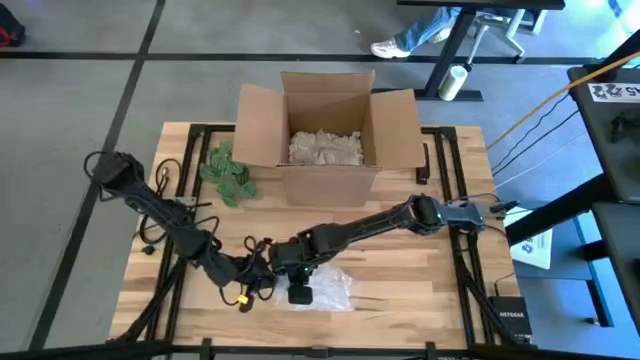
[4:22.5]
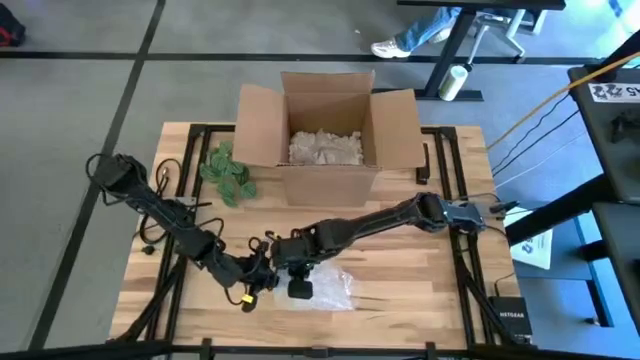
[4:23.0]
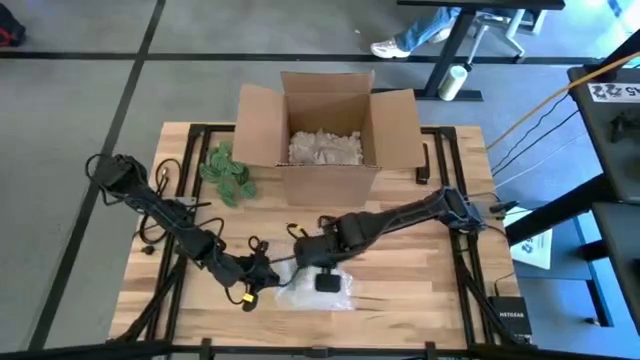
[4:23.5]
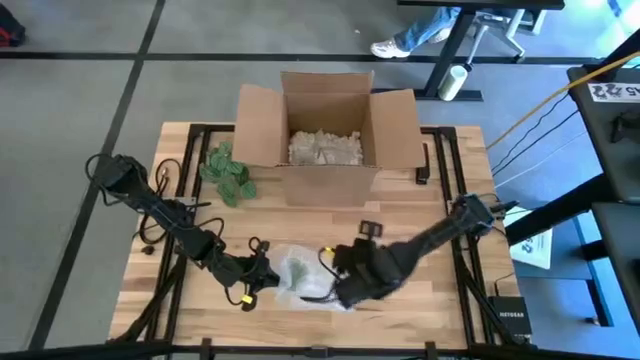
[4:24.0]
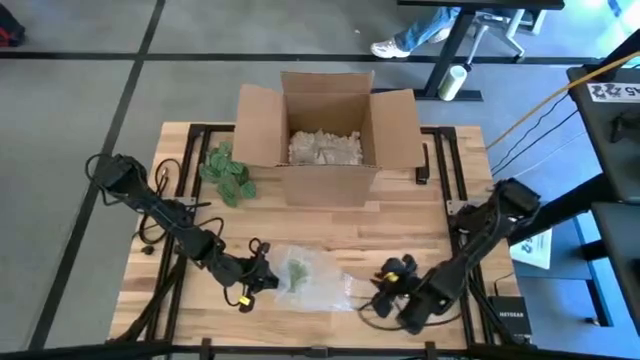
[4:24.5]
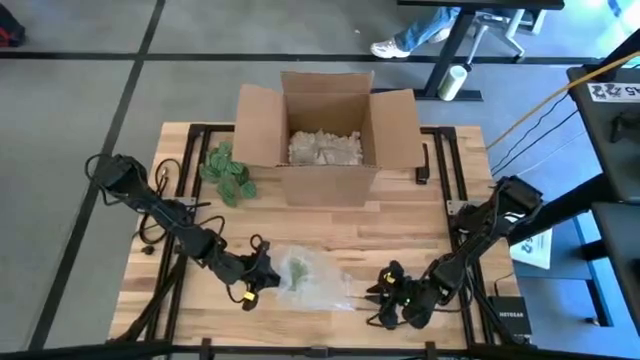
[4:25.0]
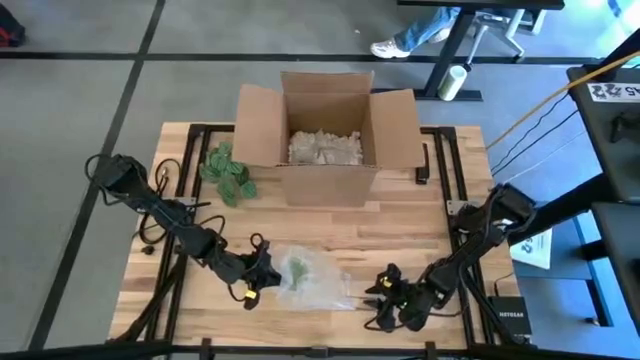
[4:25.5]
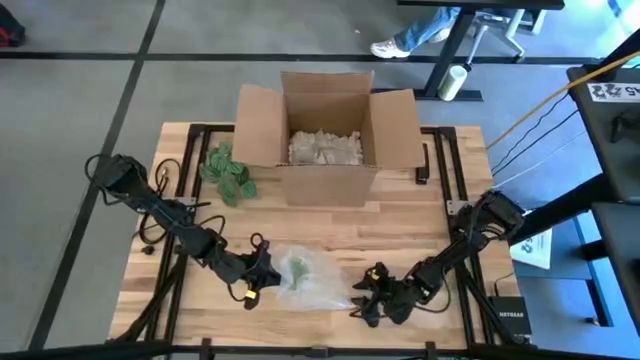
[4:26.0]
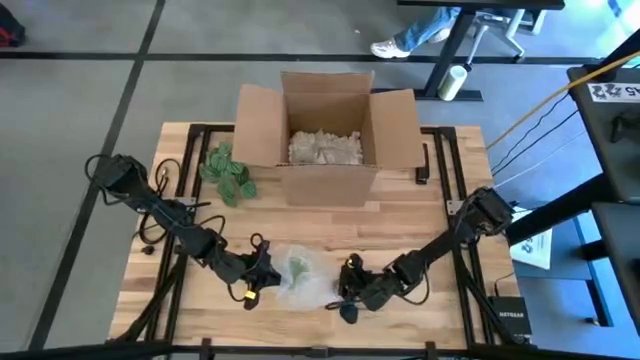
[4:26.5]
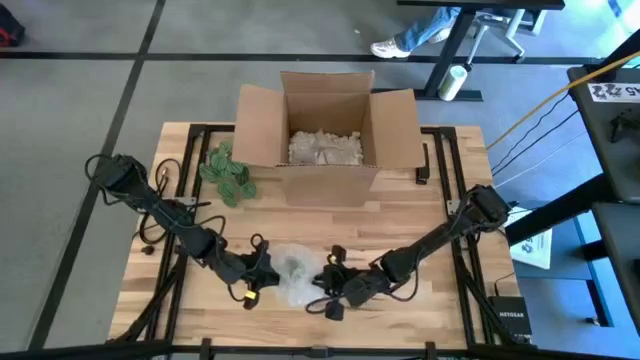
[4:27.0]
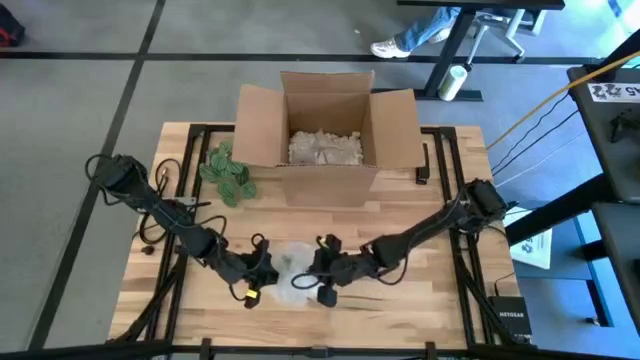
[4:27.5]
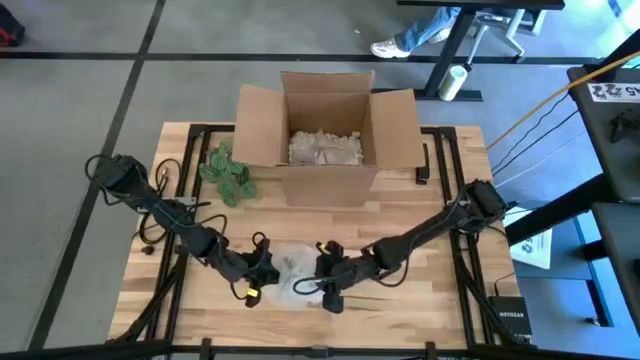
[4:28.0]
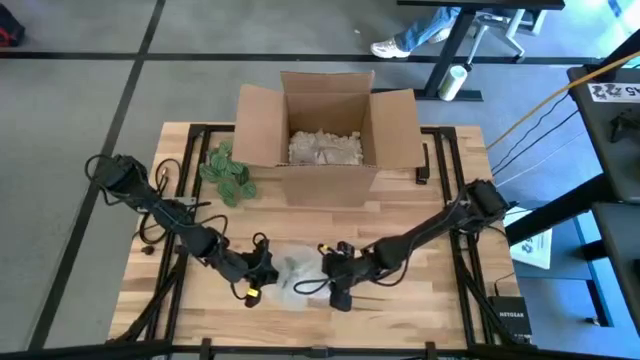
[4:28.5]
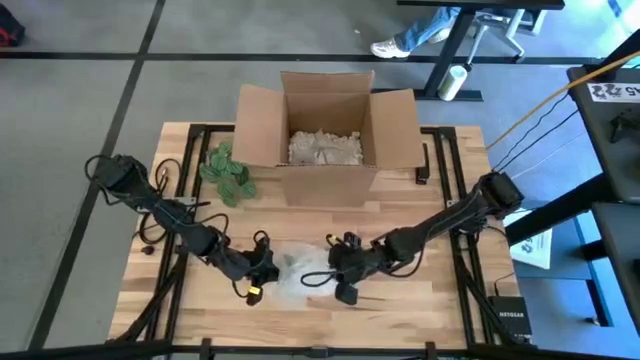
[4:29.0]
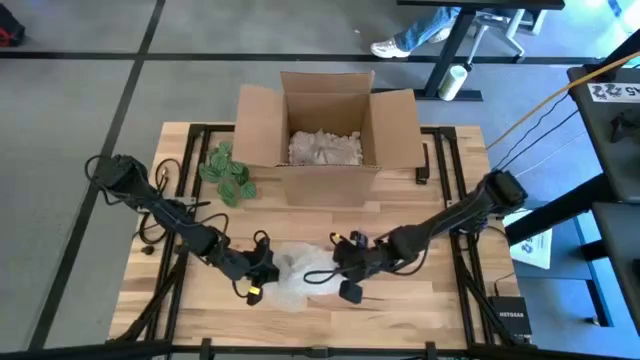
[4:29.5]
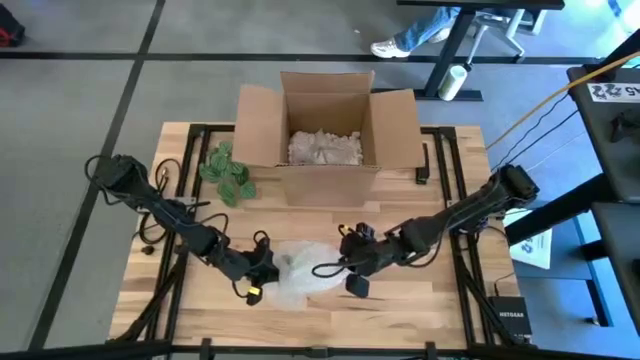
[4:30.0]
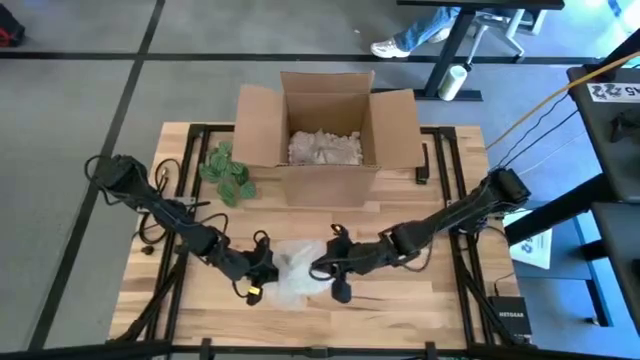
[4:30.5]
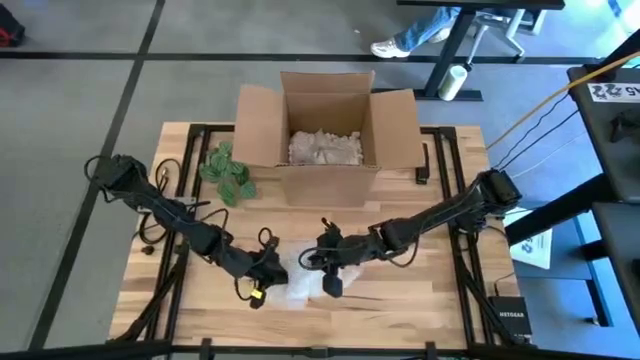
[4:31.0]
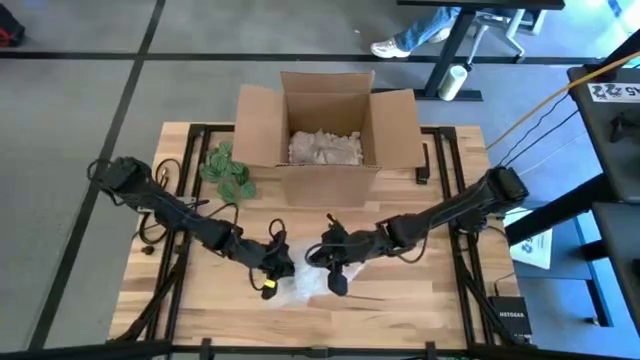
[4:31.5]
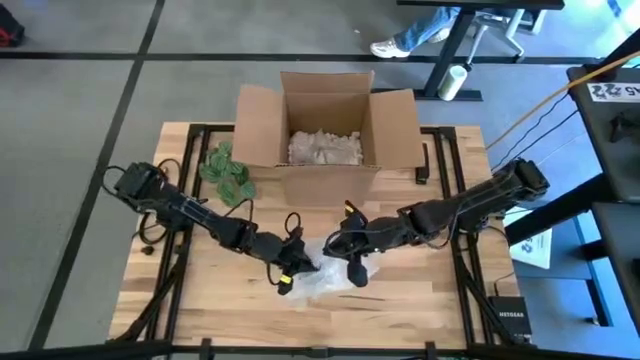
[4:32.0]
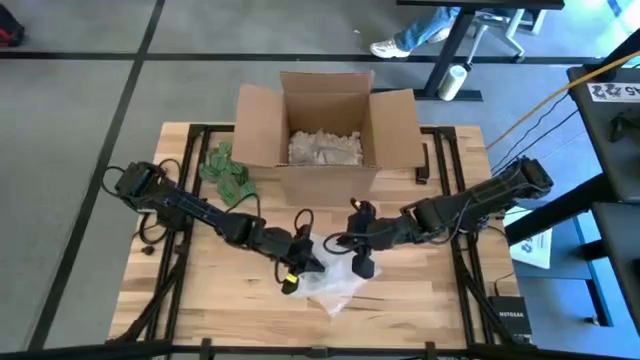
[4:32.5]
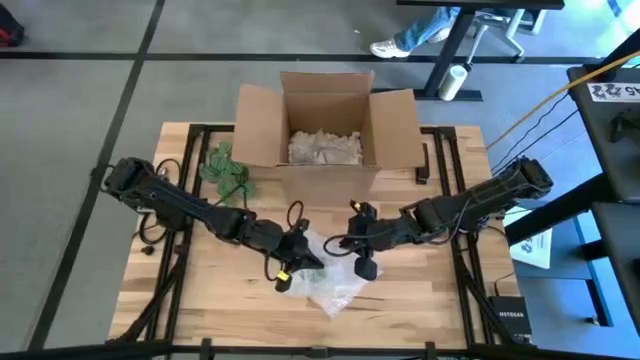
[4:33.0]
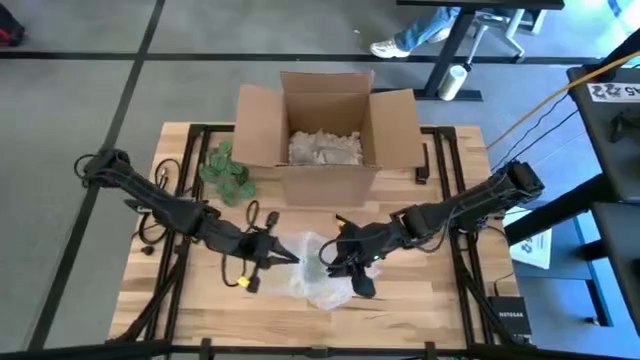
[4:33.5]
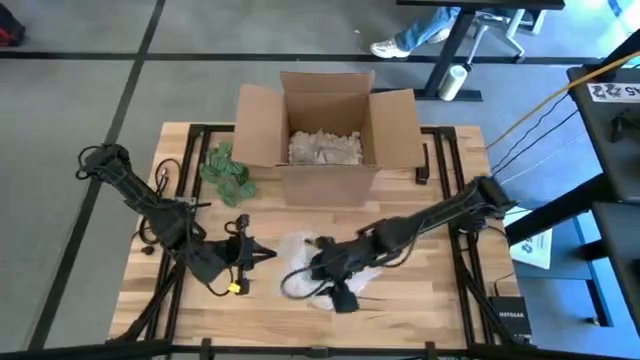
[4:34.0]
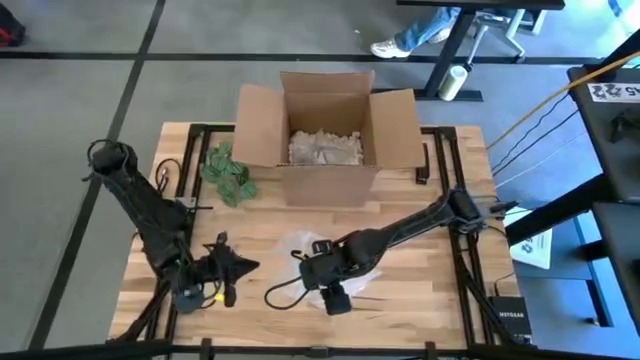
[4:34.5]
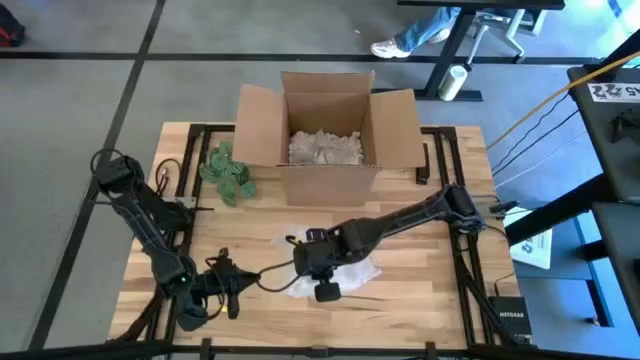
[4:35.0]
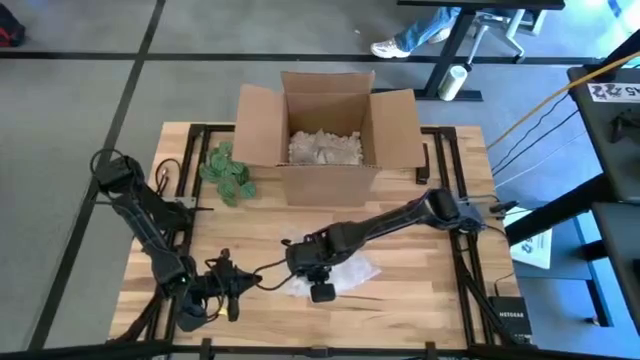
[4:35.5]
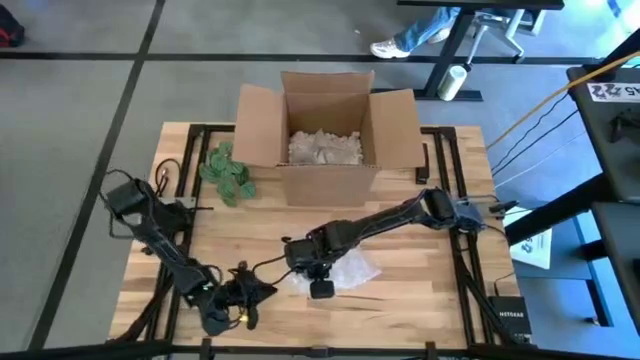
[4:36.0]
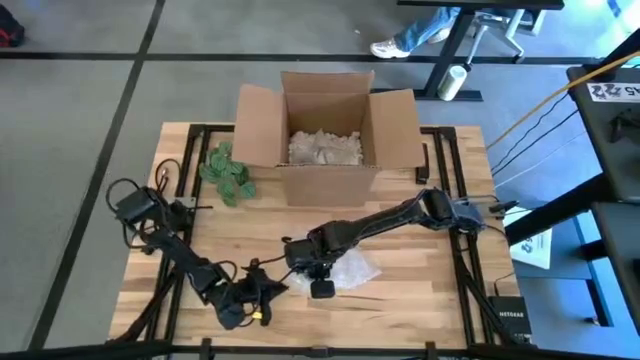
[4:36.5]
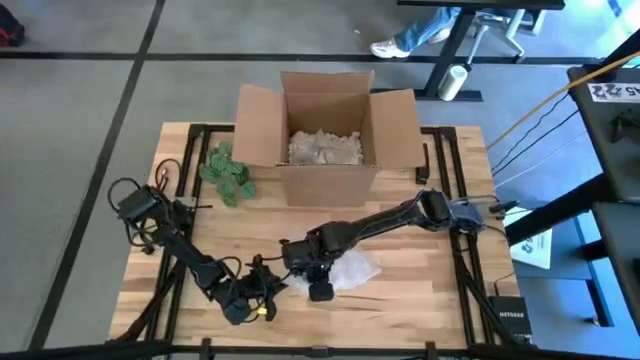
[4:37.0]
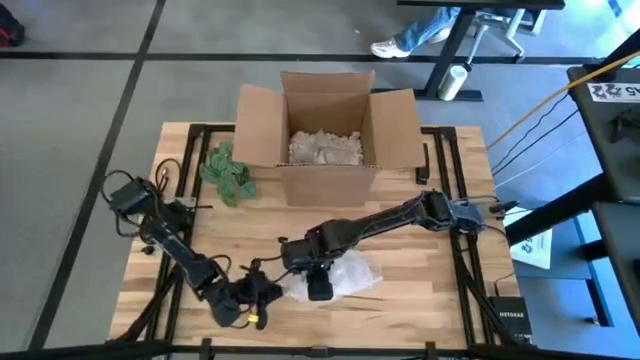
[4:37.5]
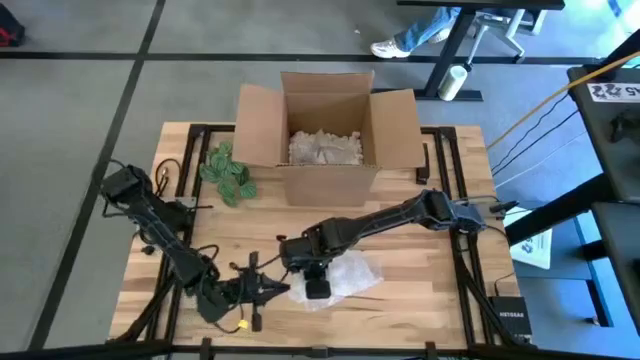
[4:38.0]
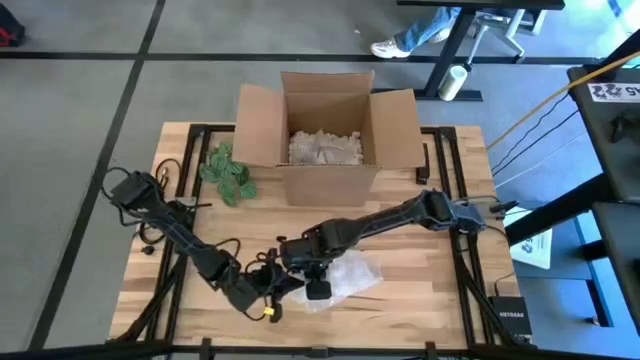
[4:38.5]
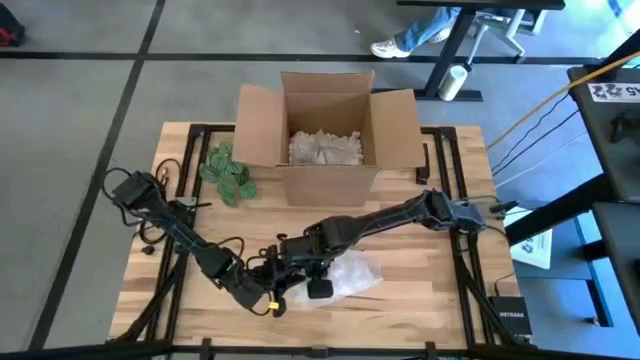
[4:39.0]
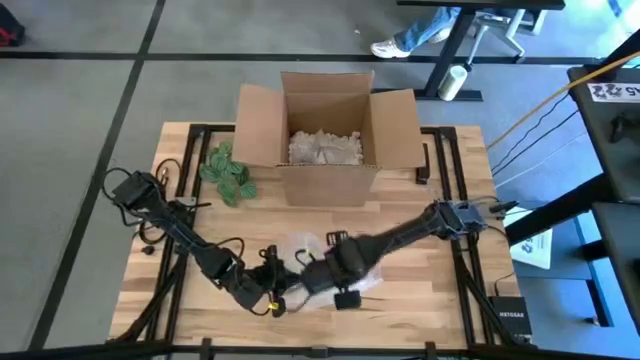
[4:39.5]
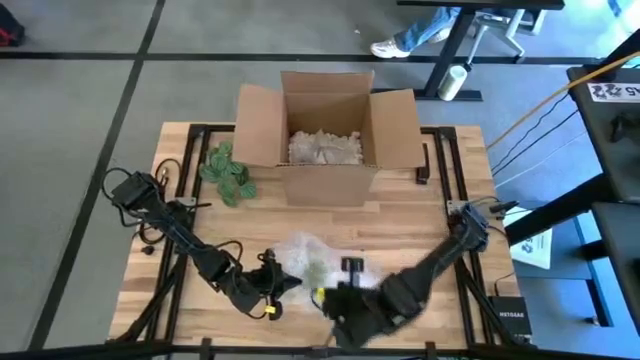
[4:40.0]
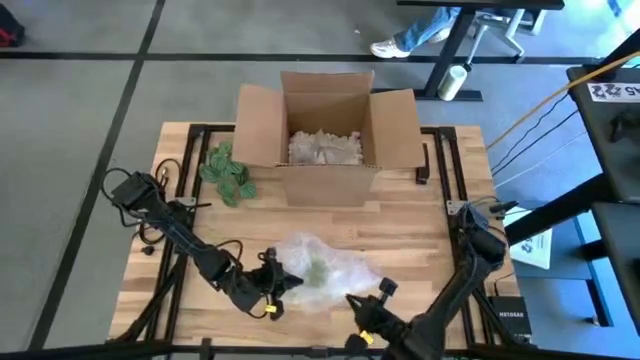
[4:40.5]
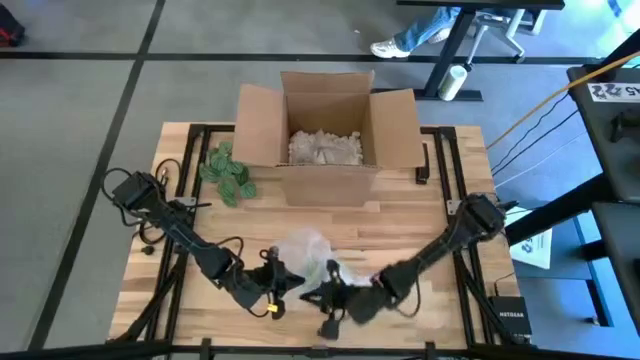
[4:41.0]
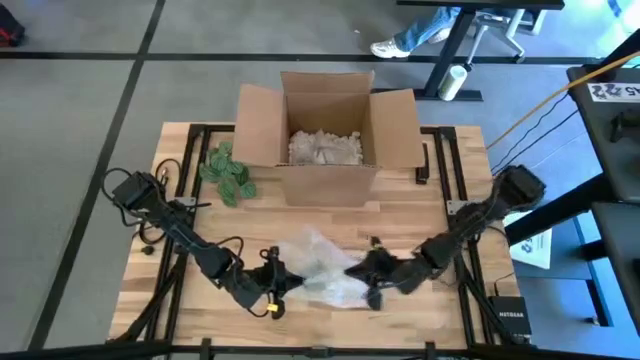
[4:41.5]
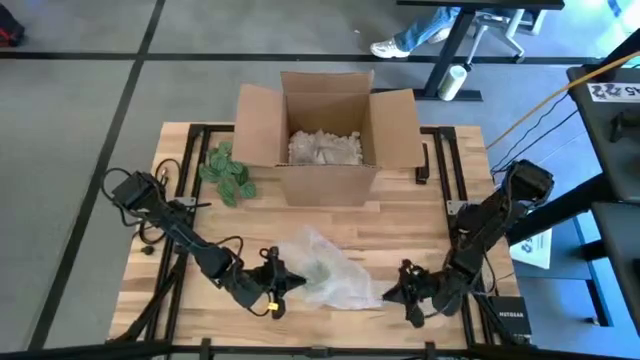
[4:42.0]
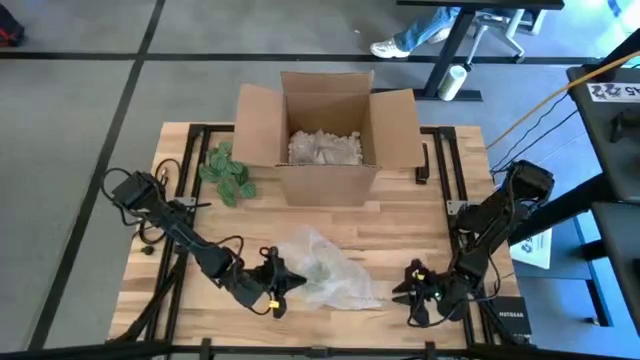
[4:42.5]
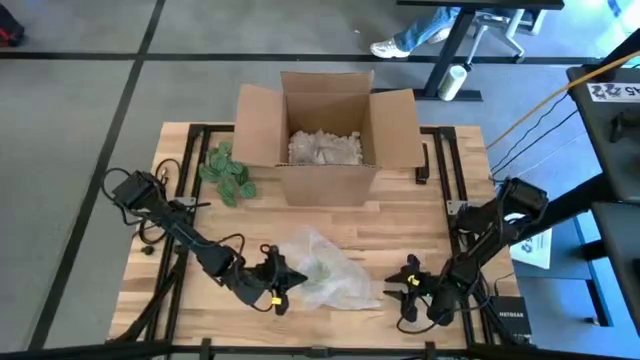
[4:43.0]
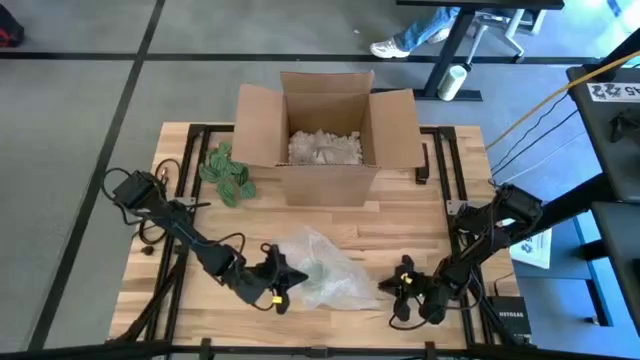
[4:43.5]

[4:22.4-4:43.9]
Task: wrap mug
Wrap the green mug in bubble wrap
